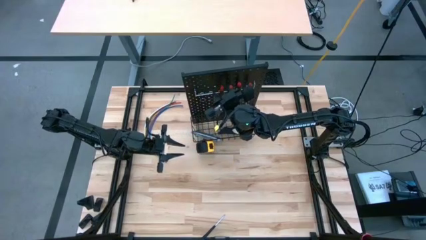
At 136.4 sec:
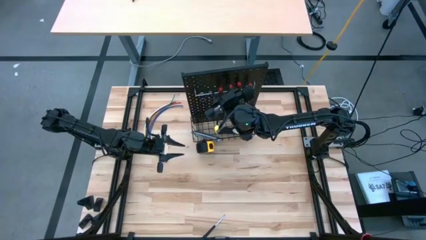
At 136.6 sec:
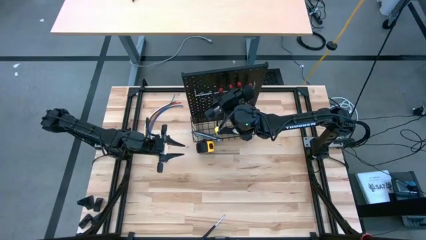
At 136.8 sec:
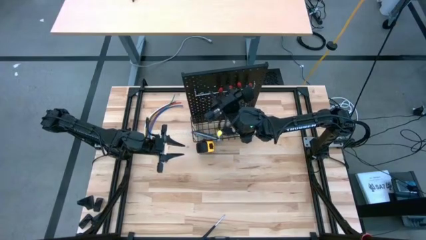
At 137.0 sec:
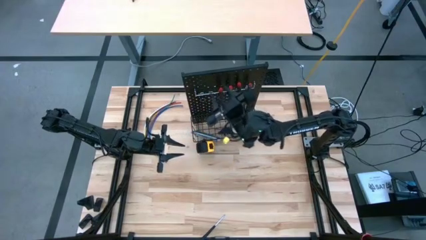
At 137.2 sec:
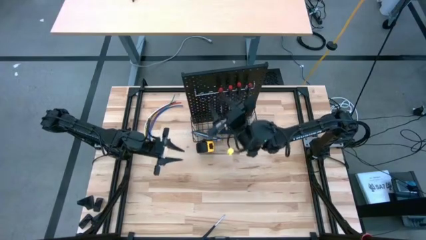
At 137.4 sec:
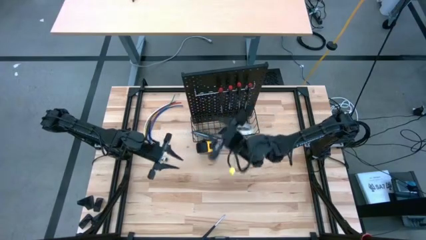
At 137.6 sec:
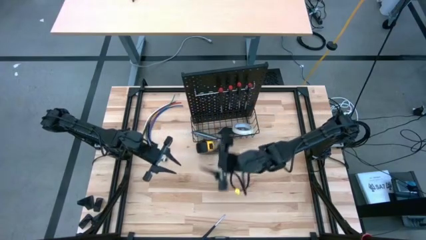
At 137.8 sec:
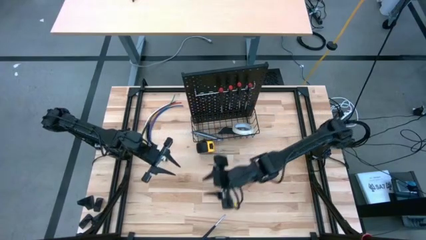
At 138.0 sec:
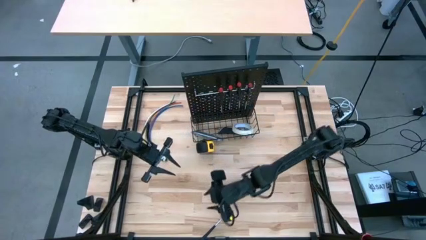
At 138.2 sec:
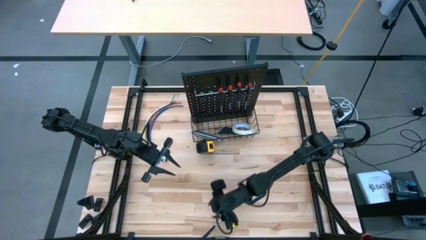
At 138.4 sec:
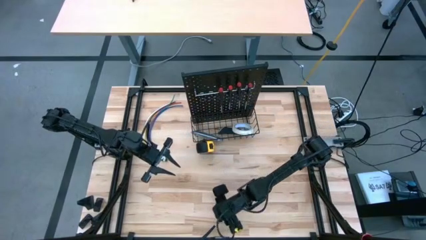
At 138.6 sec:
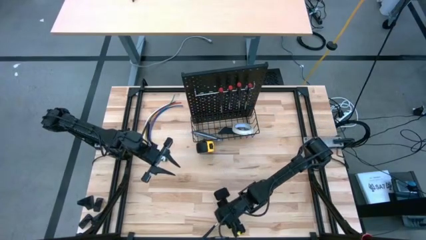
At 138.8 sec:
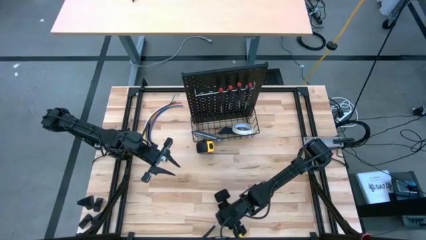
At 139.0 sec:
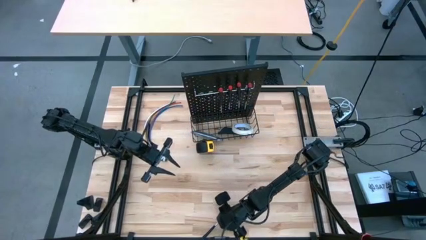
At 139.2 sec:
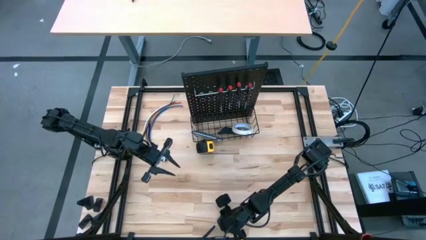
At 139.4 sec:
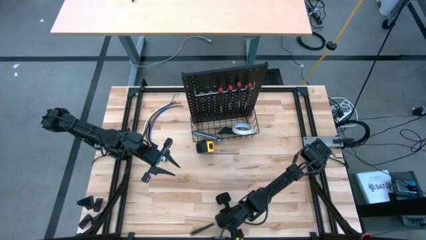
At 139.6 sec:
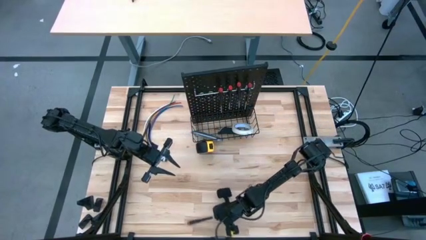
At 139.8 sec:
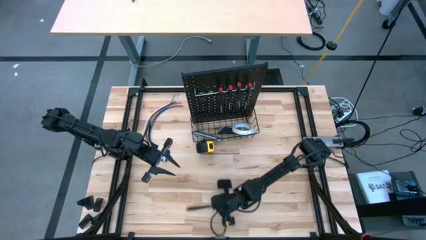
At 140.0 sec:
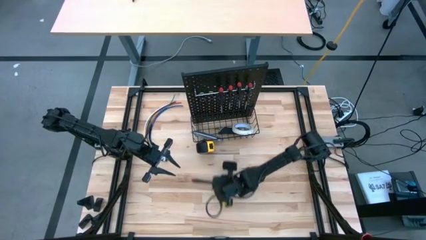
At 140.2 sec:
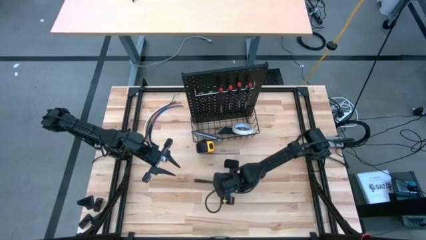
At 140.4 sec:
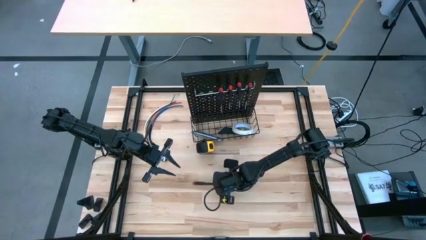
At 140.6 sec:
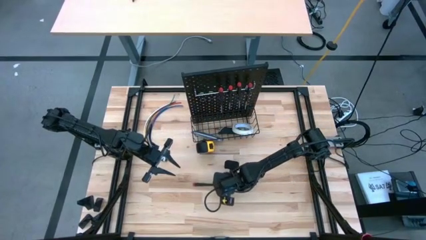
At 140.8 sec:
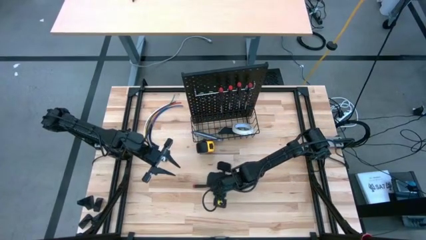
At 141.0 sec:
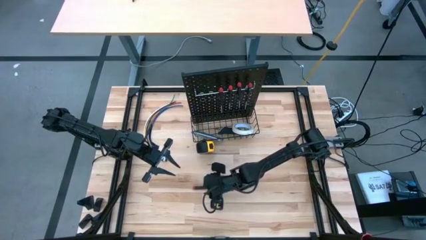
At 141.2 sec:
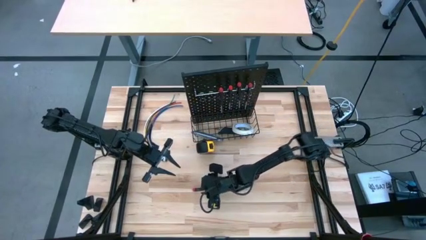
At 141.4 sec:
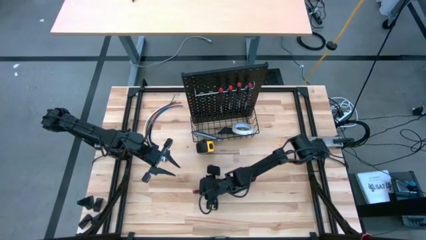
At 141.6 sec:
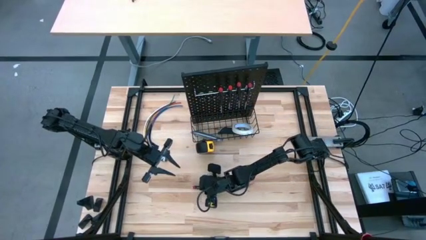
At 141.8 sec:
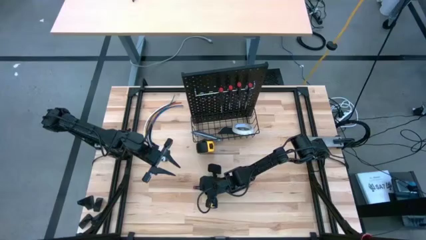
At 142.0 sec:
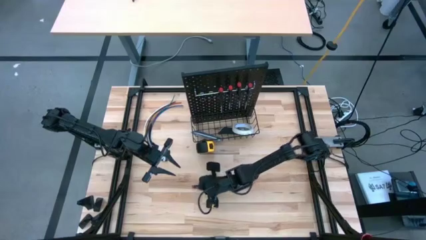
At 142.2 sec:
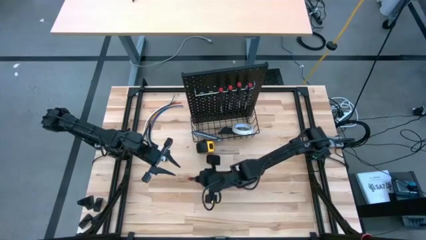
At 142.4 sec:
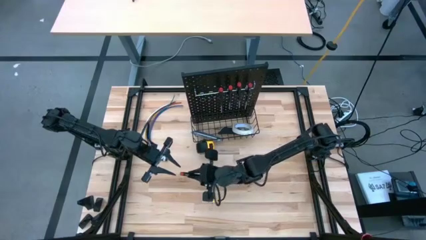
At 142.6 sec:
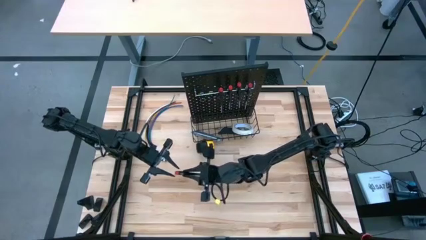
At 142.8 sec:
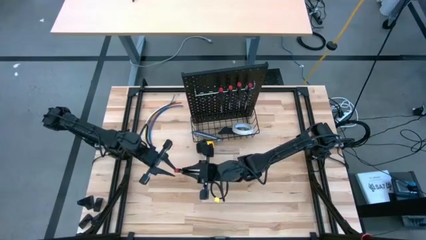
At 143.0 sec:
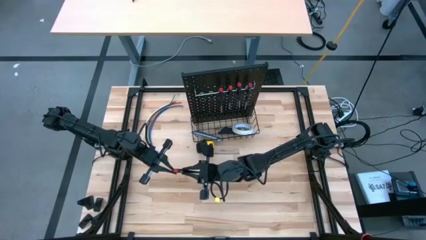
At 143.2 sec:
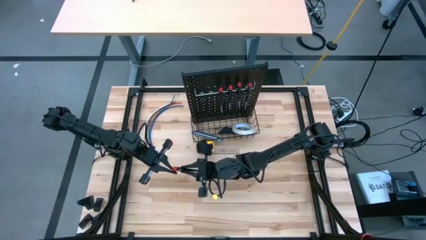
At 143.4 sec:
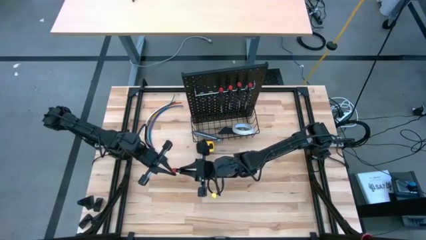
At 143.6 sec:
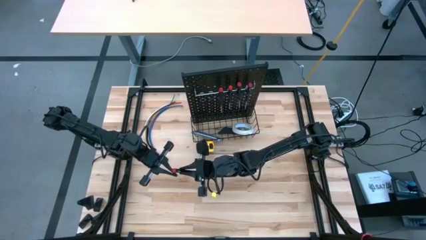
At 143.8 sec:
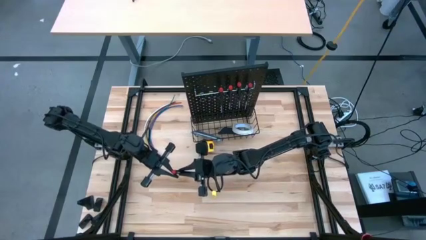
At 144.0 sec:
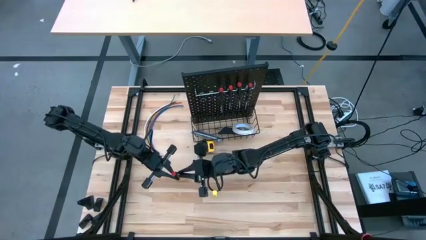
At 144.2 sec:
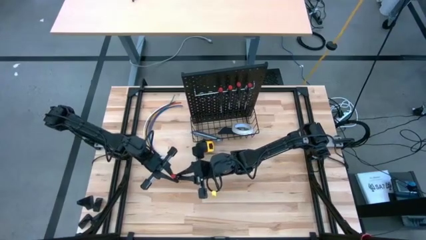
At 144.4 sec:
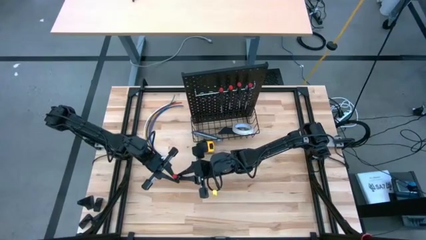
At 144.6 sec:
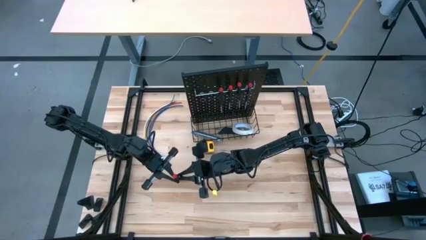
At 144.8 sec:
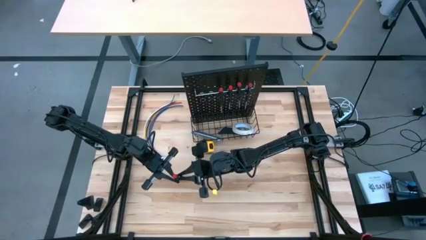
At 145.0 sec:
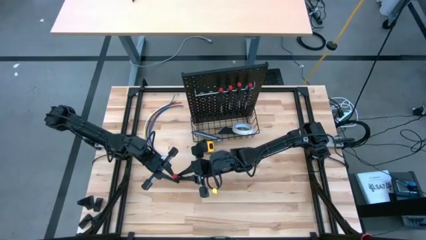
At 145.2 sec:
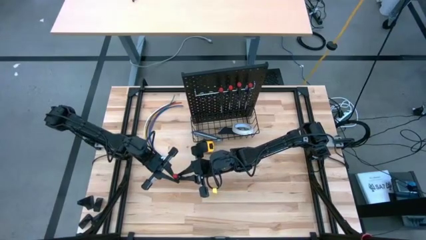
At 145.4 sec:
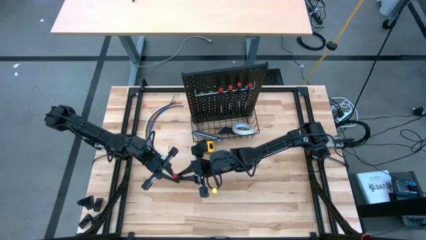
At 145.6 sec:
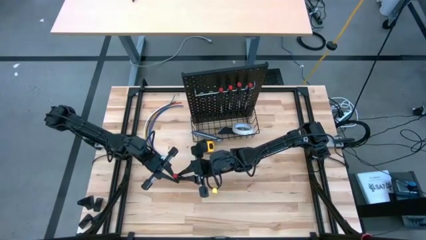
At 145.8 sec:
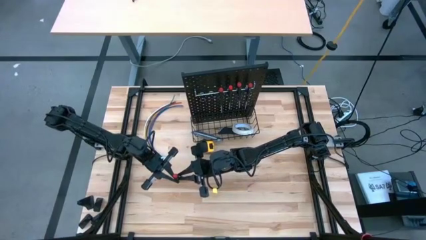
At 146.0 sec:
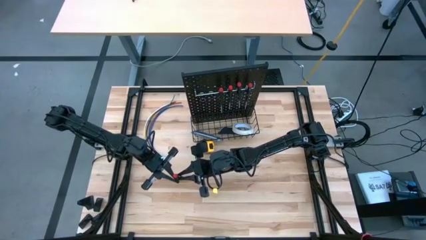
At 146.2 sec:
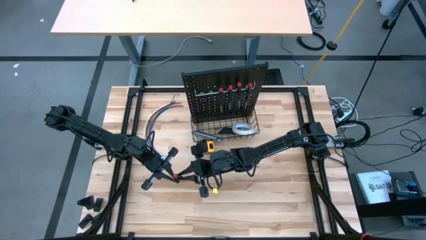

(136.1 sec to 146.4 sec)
Task: Hang tools onto peg board
Hang the black screwdriver onto the pegboard

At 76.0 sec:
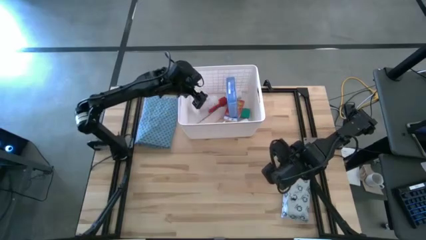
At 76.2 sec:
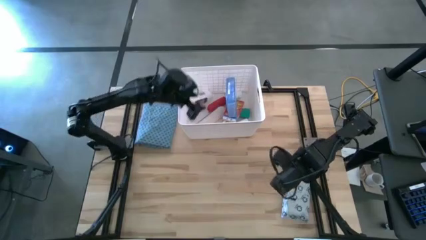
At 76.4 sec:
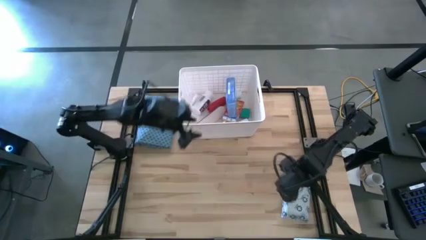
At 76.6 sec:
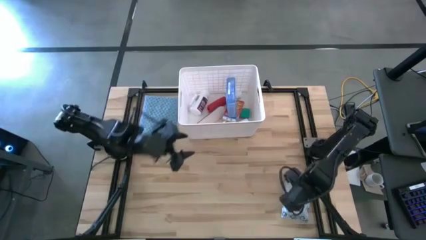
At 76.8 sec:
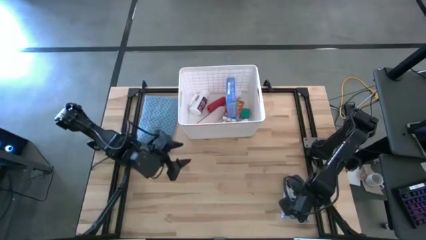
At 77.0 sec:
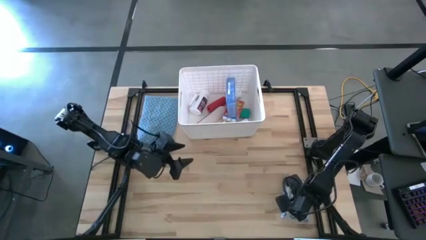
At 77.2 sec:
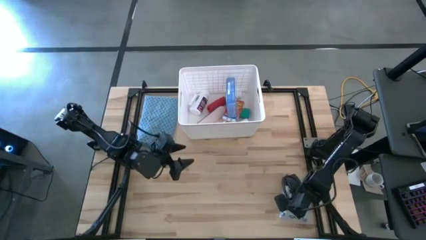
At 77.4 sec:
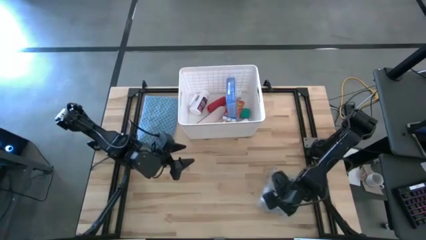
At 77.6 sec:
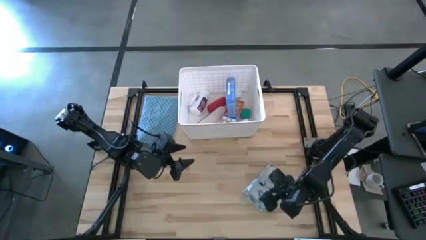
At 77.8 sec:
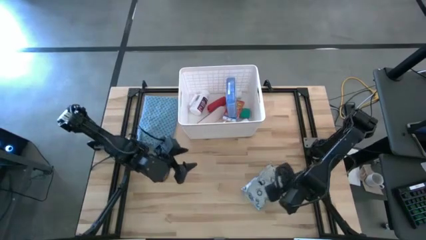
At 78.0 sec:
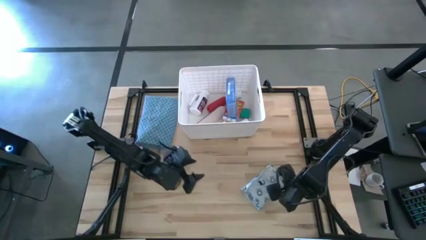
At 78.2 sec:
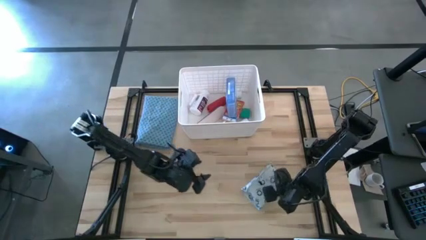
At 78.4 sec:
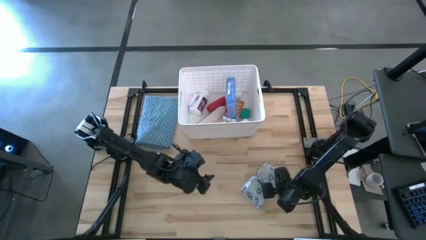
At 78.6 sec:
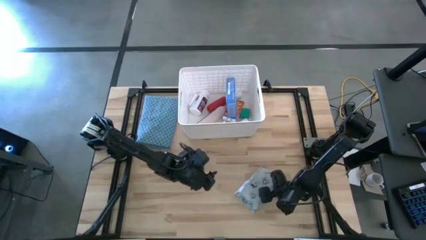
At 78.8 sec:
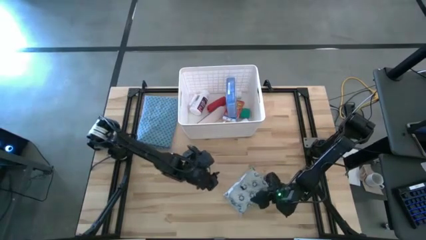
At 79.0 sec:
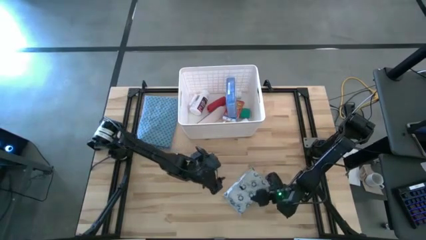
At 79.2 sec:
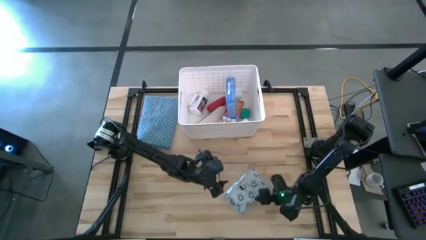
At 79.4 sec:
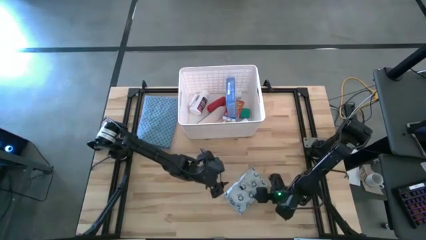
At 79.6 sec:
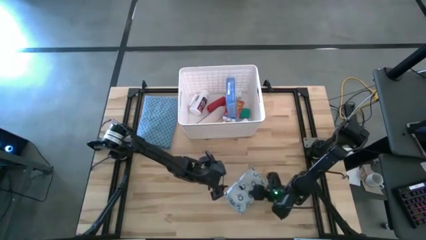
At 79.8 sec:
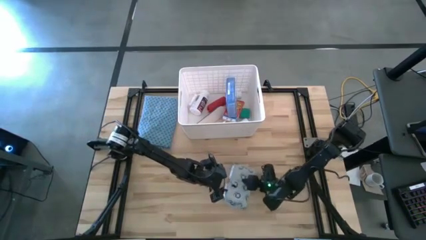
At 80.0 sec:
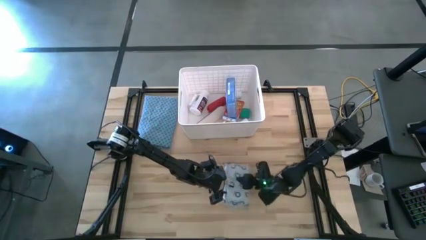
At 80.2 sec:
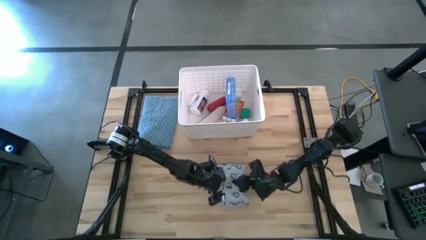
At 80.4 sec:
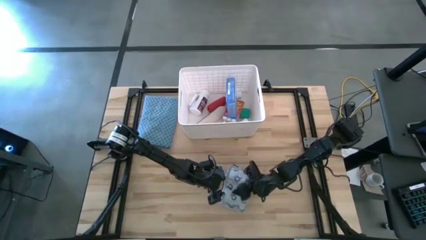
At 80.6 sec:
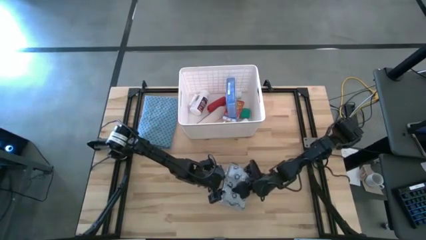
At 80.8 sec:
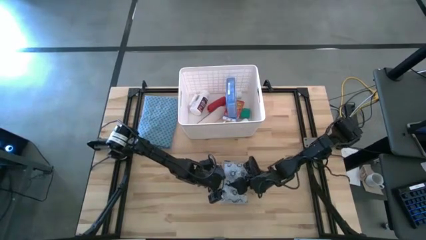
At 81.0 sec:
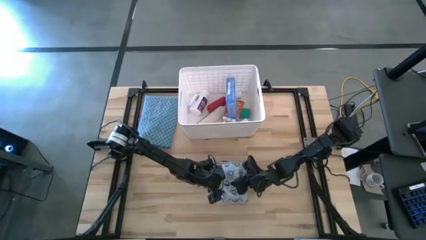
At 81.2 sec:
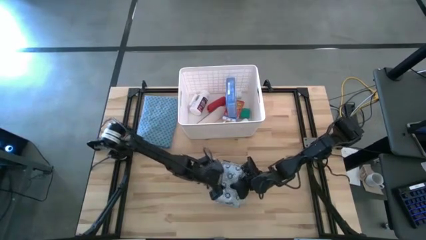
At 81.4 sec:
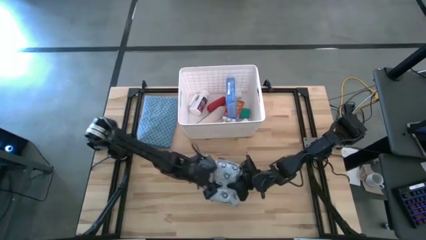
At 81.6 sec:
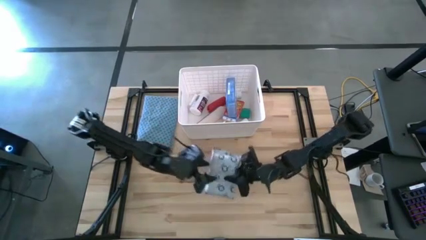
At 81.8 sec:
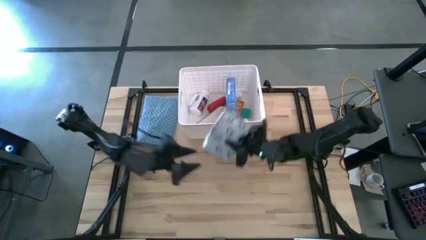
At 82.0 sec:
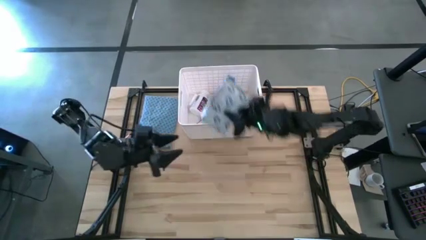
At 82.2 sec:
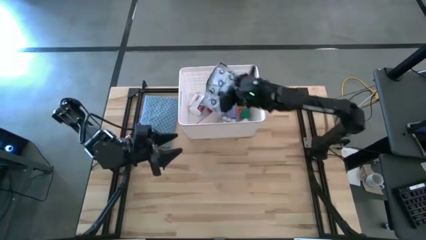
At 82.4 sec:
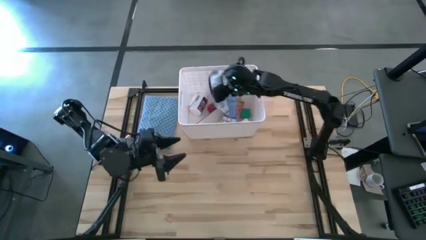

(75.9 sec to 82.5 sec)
Task: Pick & place medical supplies in basket/bin
Put the white mailer bag into the white bin
